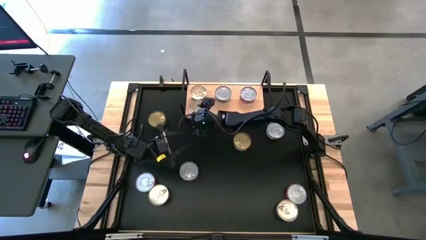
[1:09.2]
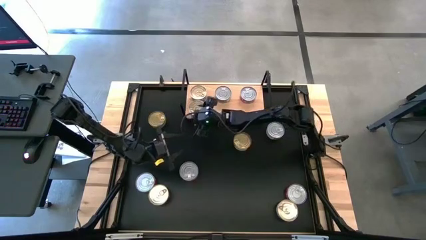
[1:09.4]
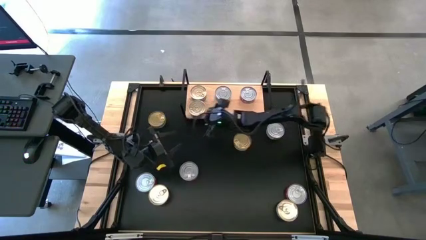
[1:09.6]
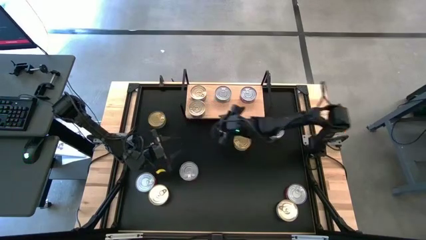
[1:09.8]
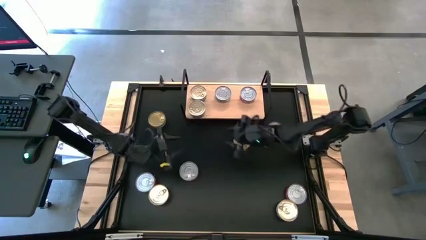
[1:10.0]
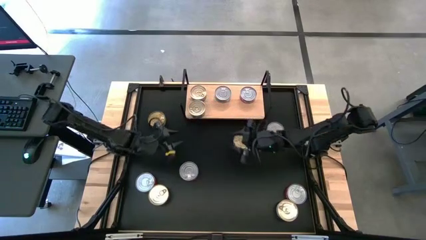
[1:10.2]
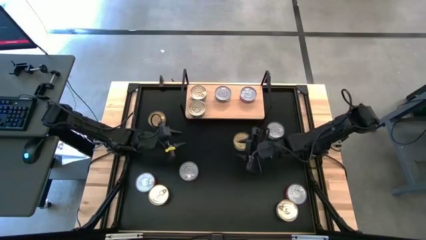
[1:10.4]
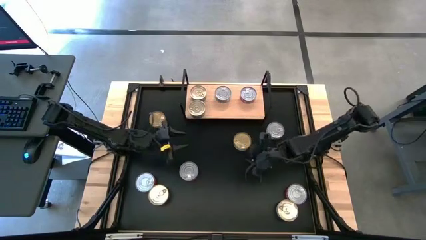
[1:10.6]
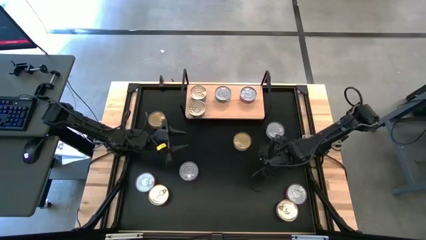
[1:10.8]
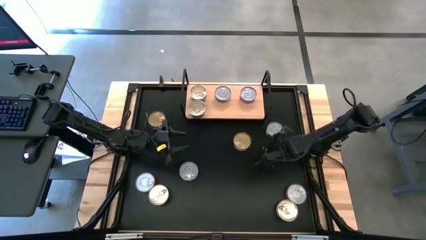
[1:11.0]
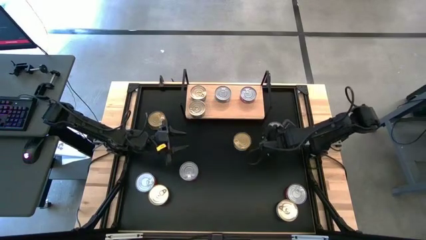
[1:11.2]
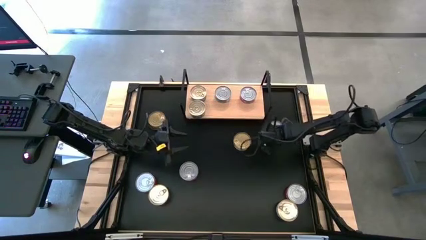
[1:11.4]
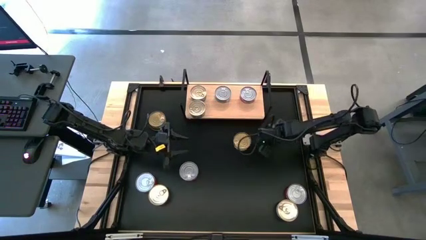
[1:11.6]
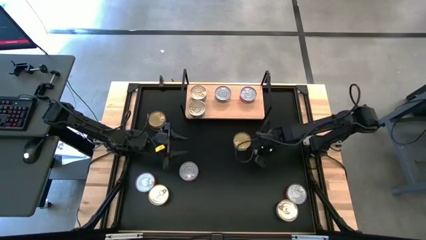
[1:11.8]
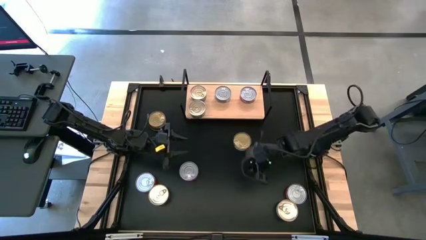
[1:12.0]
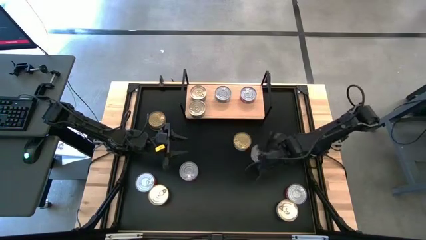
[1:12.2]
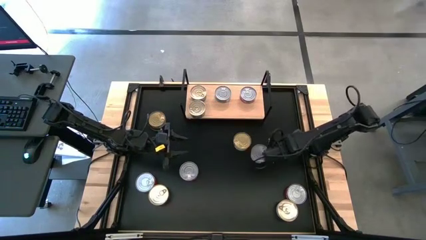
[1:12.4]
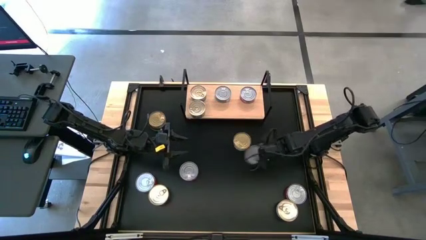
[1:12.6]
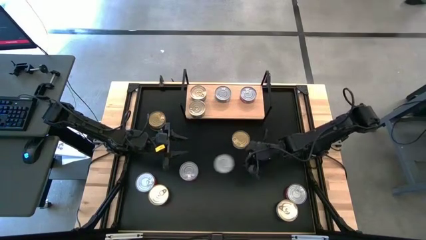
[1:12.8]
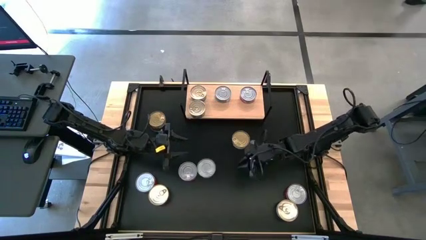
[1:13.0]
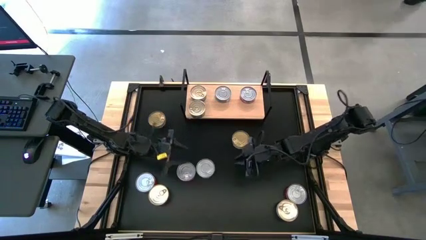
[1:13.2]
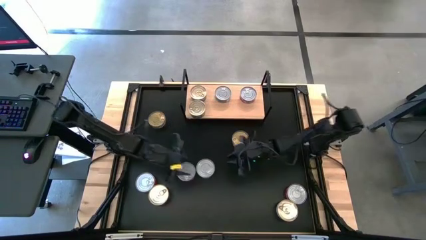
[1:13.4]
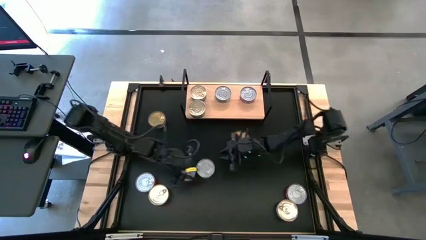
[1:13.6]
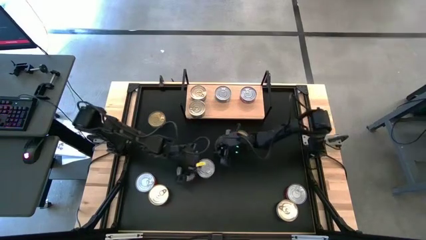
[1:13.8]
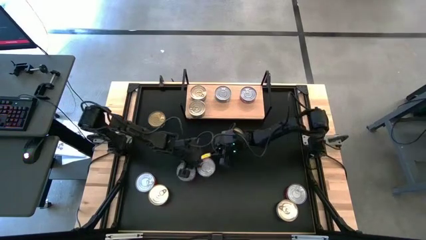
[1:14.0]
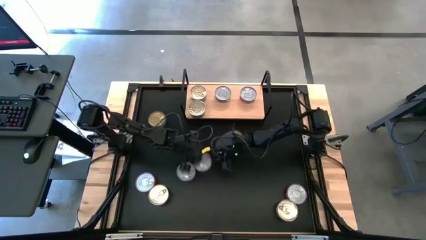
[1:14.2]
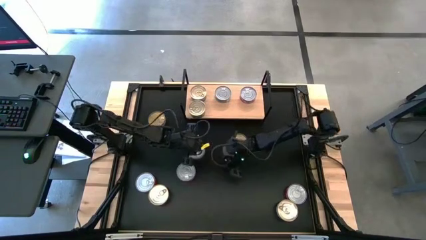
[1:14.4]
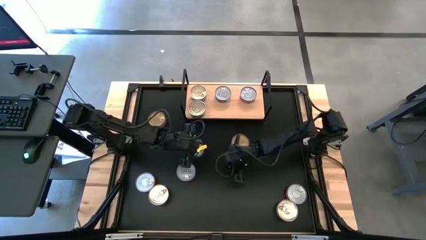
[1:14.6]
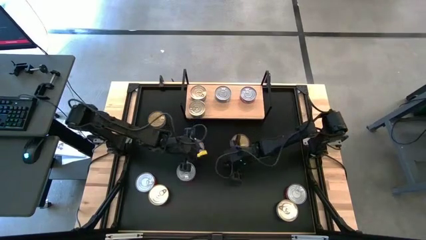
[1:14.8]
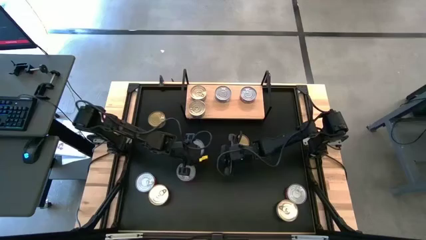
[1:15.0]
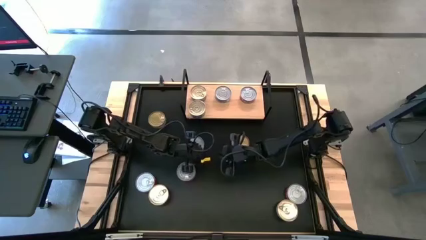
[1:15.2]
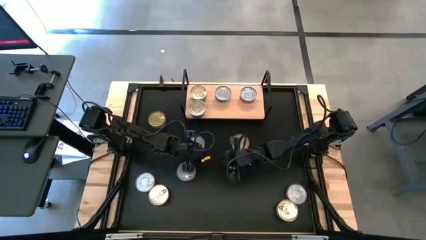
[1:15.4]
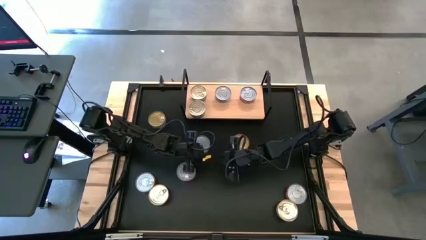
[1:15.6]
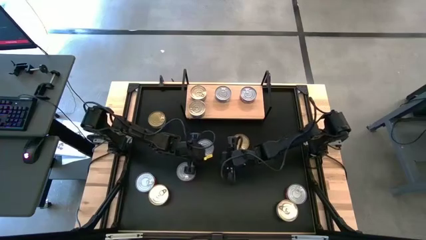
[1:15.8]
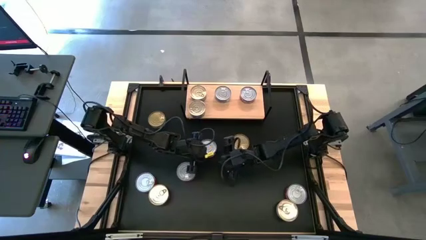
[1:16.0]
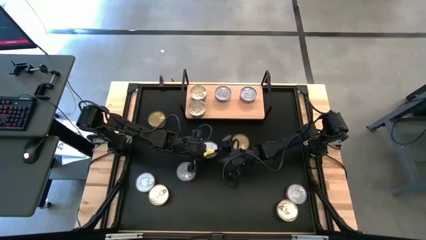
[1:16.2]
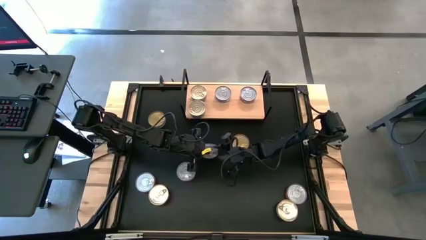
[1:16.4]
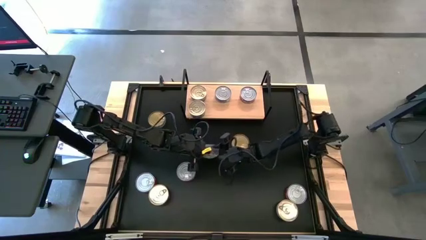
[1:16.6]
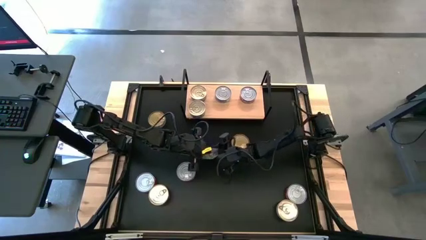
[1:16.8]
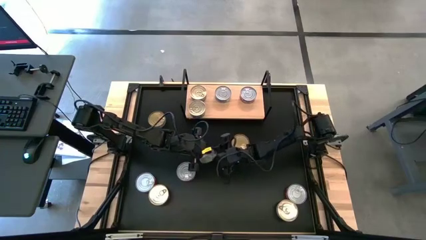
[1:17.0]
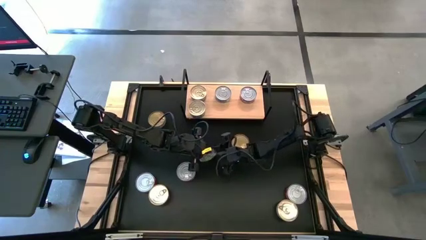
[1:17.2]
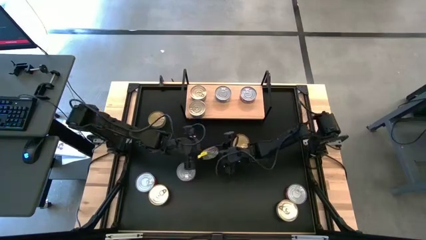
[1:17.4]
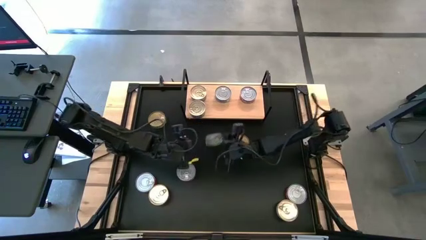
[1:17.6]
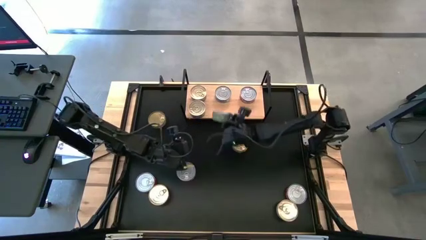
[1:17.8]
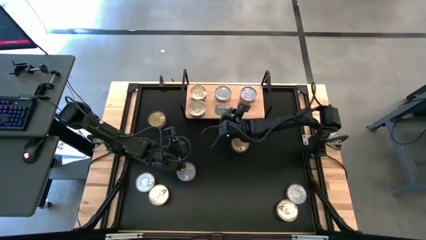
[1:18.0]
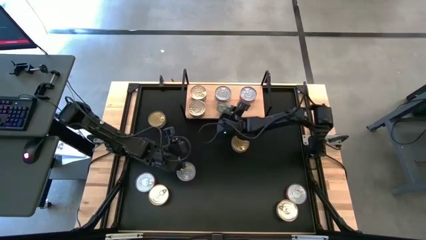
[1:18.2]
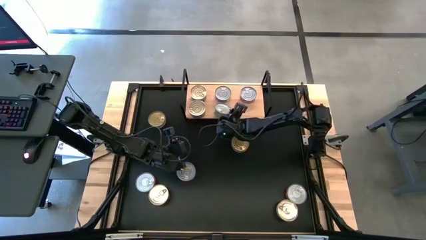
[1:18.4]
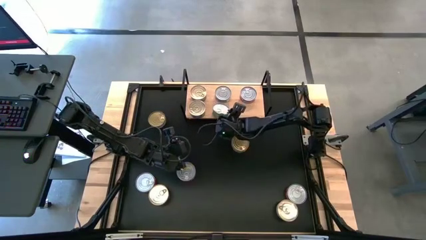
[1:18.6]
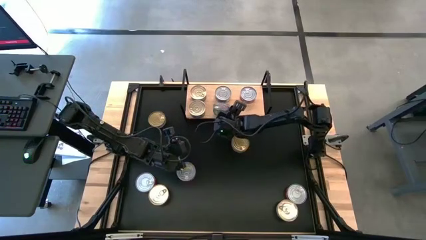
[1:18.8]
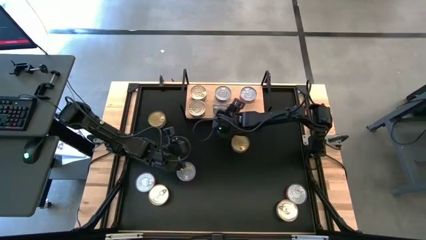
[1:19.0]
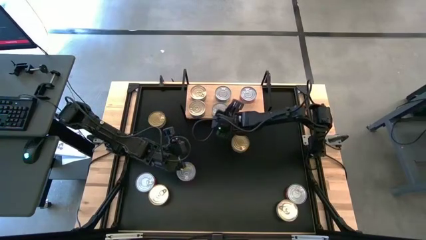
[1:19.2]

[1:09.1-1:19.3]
Task: Stack canned seafood by type on shelf
Put the top right green canned tuna on the lower center shelf

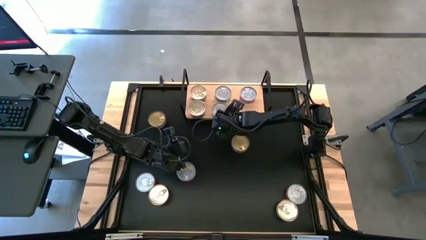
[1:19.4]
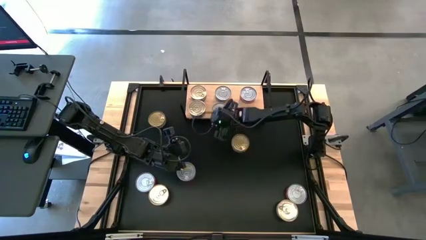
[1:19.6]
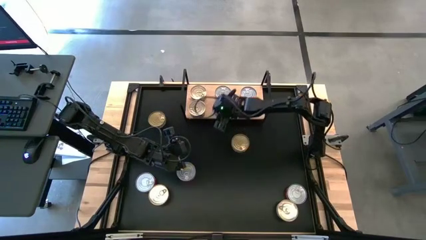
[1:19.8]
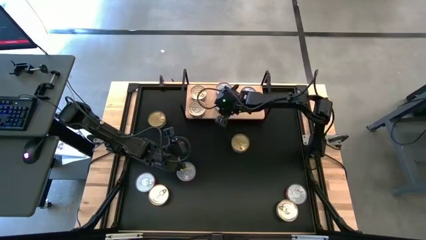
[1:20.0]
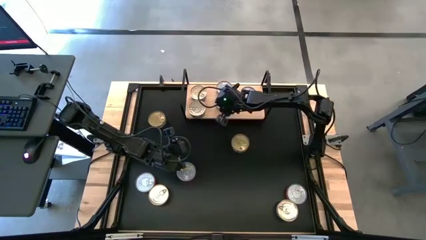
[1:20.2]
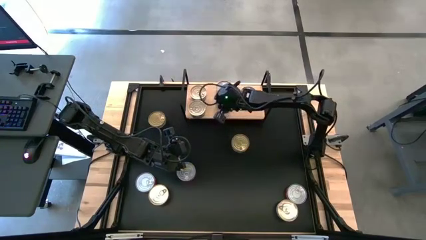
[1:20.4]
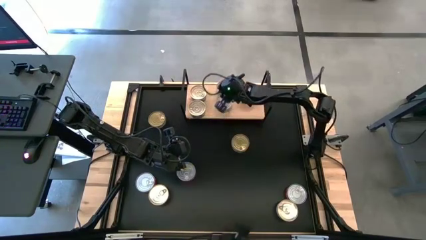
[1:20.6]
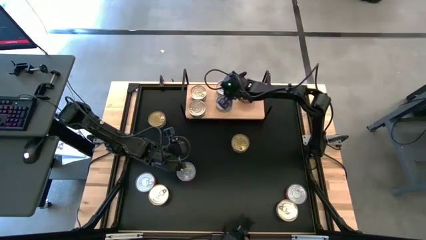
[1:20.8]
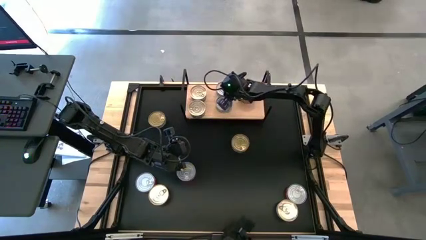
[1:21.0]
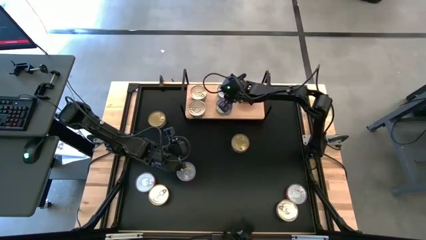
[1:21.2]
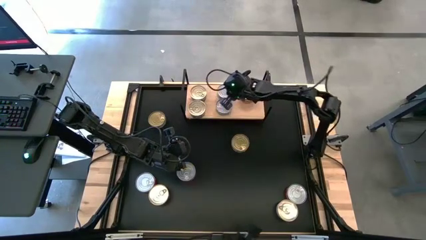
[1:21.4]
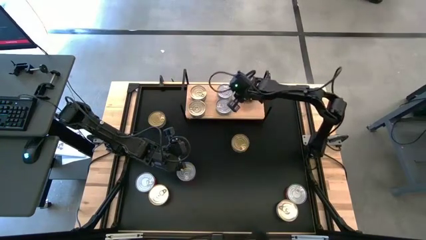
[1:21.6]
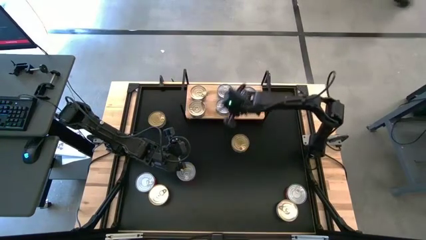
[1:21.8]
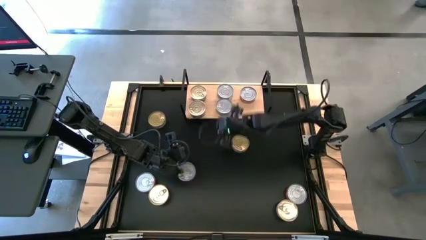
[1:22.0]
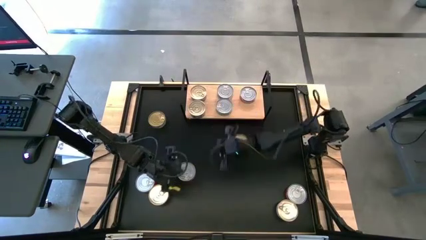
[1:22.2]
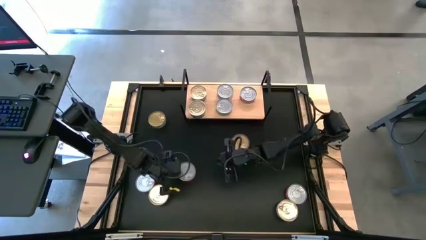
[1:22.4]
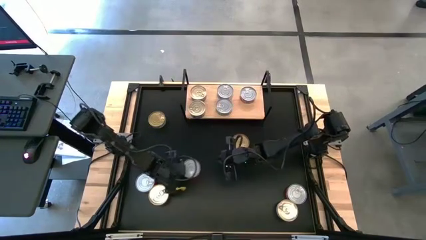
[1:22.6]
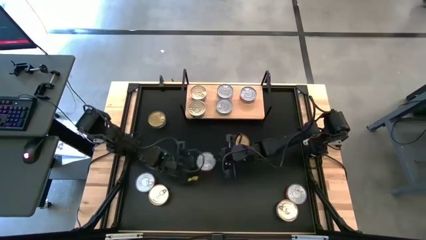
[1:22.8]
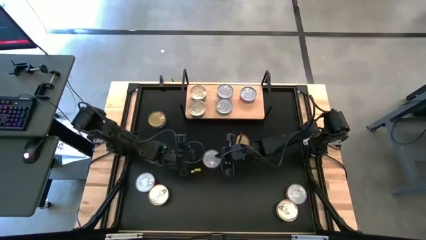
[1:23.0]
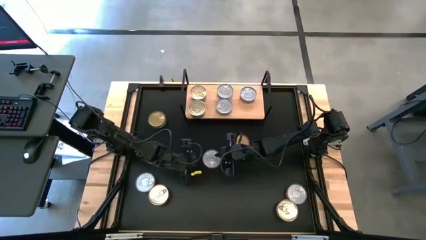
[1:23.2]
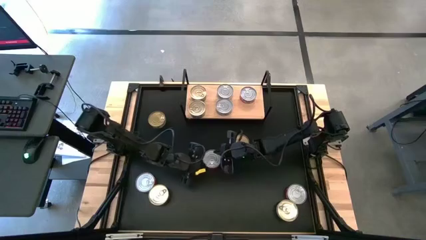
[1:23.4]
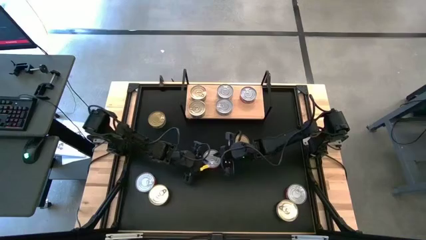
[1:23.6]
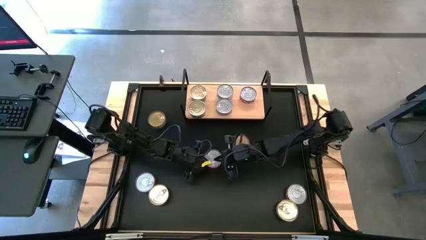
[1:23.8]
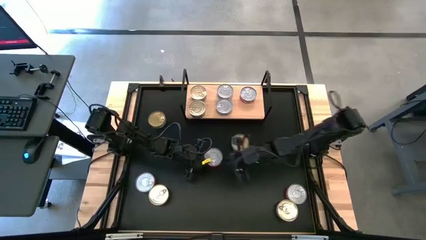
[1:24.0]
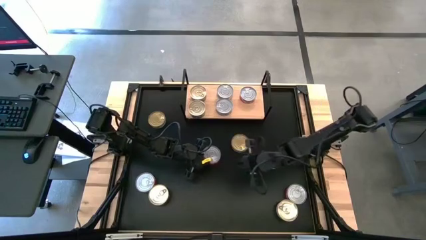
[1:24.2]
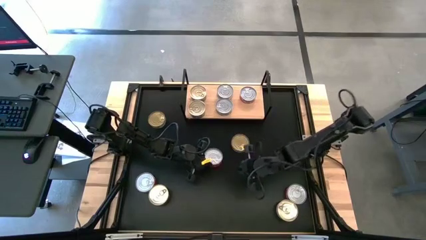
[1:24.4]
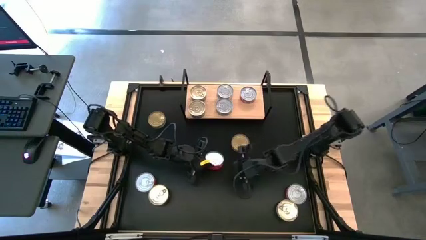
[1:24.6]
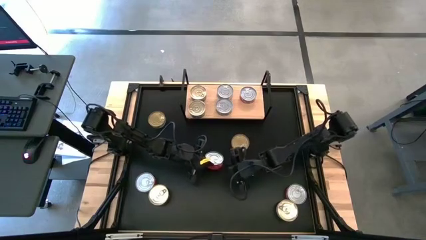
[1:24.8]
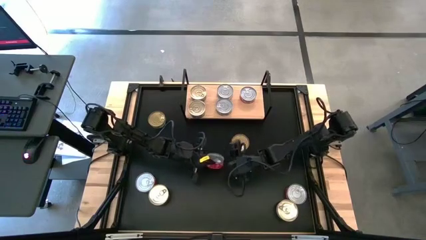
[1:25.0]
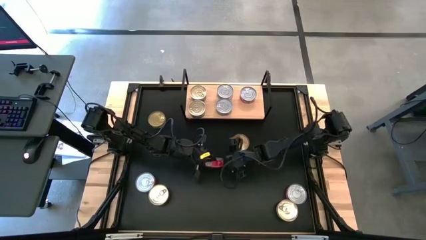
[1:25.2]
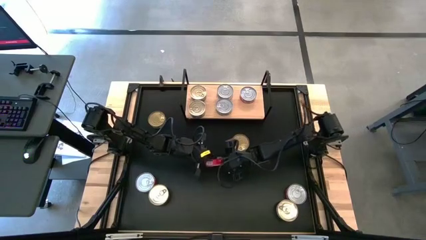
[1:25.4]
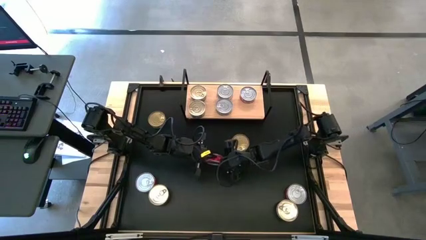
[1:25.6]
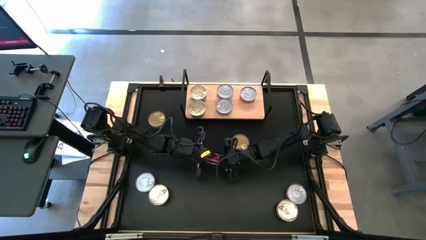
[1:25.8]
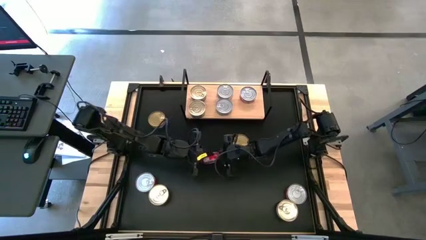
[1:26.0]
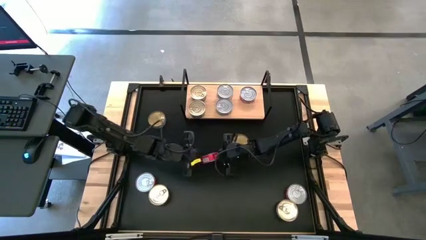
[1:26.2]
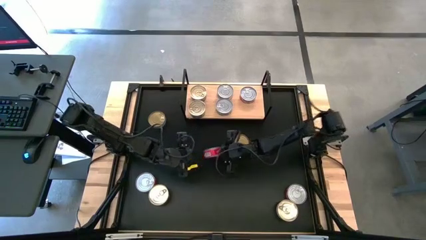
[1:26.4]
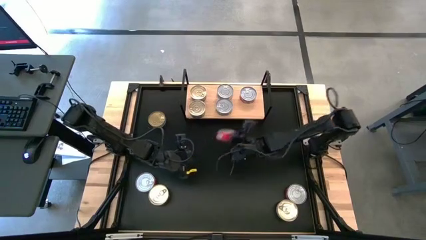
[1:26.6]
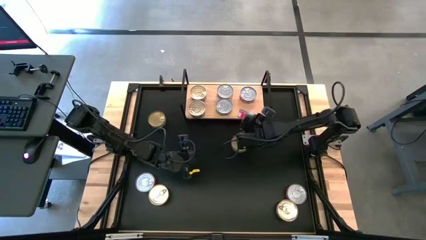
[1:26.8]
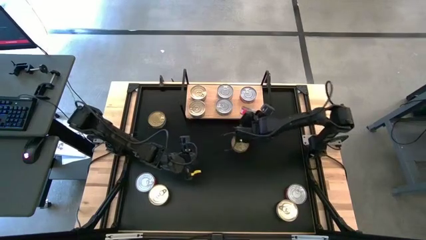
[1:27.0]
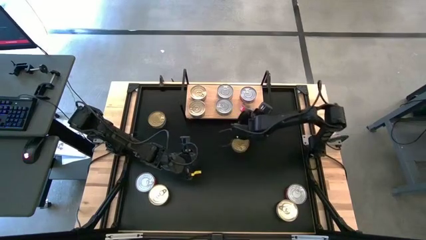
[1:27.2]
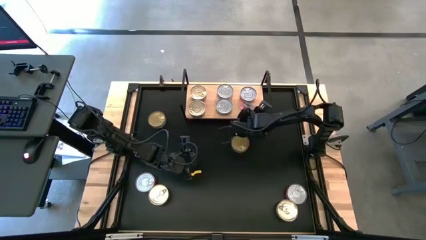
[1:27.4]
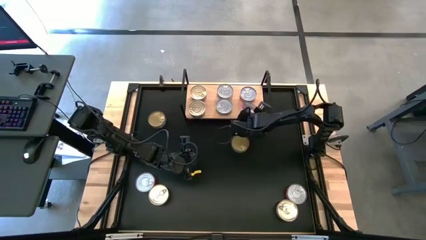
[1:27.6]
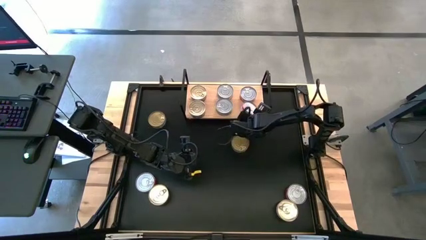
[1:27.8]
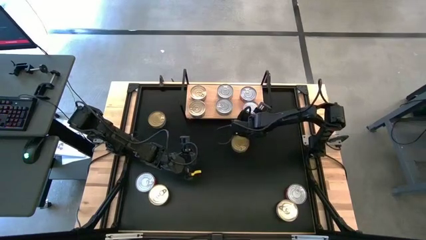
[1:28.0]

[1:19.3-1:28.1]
Put the center red canned tuna on the lower right shelf
